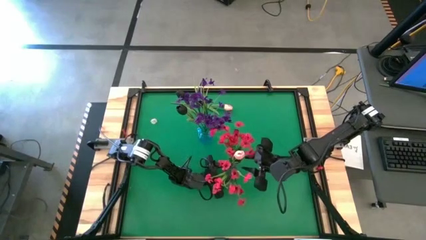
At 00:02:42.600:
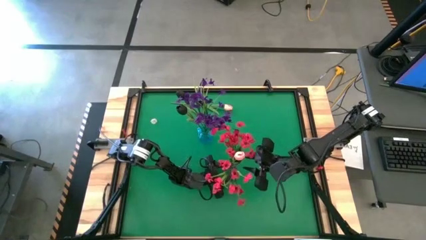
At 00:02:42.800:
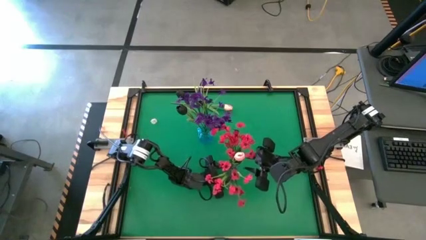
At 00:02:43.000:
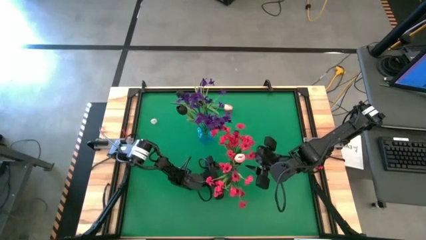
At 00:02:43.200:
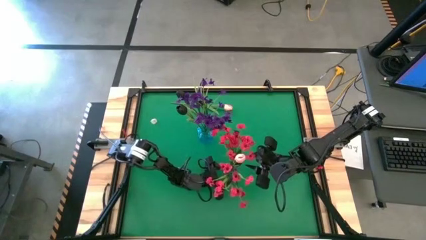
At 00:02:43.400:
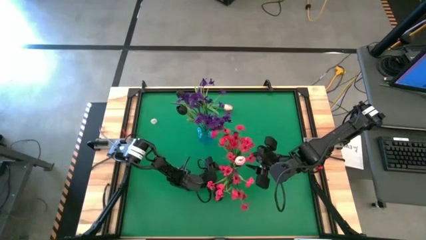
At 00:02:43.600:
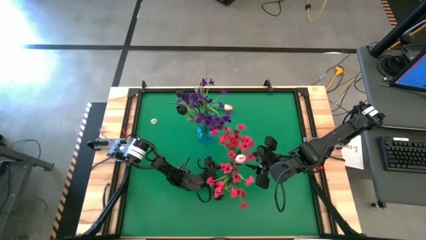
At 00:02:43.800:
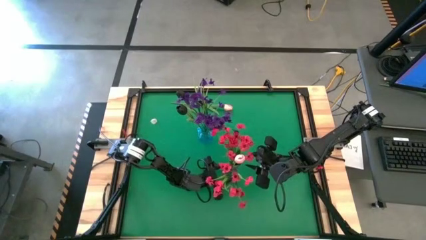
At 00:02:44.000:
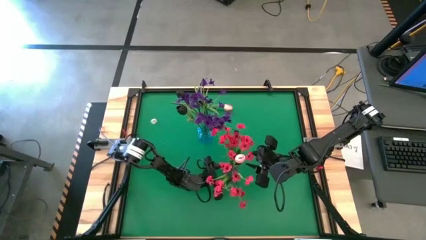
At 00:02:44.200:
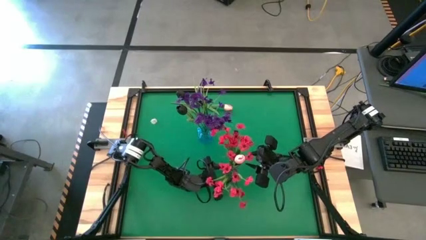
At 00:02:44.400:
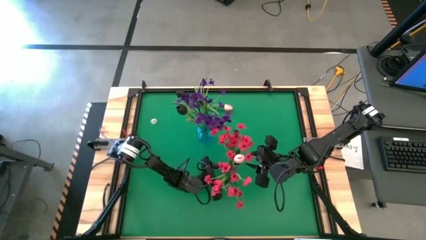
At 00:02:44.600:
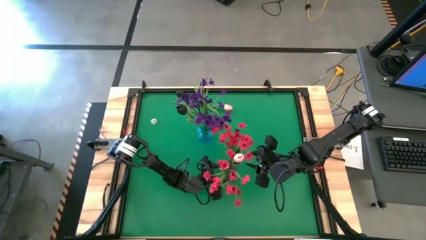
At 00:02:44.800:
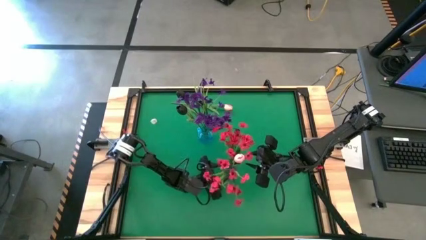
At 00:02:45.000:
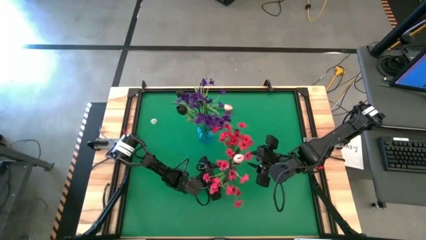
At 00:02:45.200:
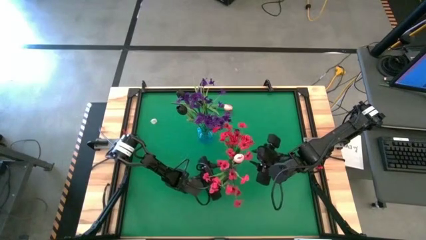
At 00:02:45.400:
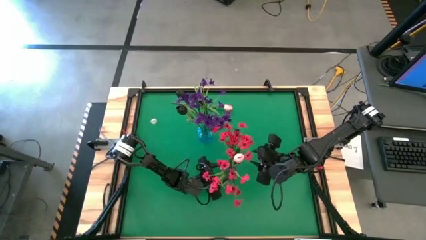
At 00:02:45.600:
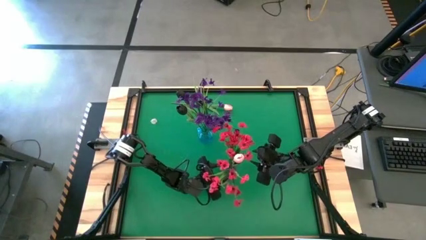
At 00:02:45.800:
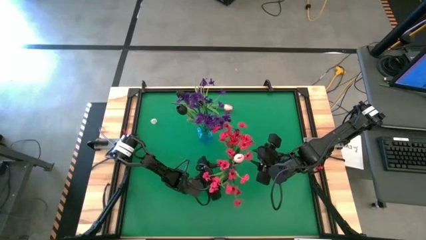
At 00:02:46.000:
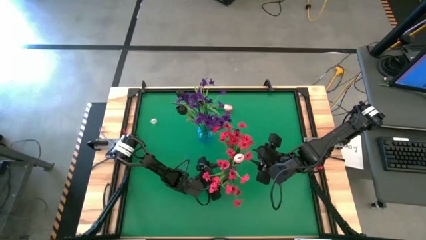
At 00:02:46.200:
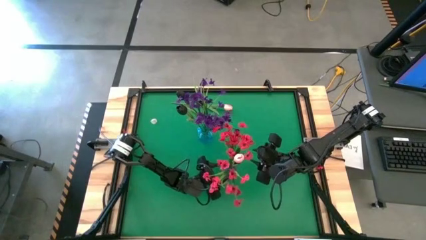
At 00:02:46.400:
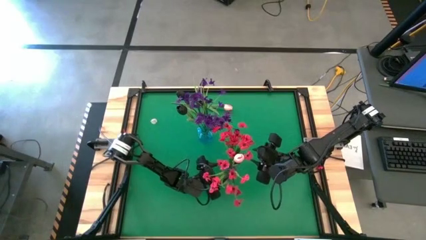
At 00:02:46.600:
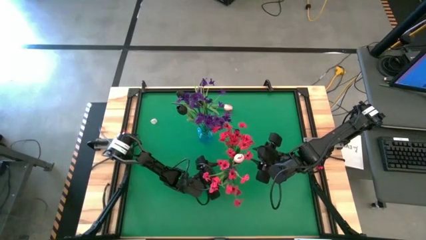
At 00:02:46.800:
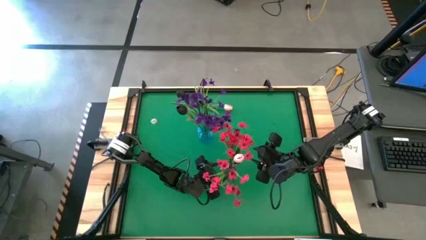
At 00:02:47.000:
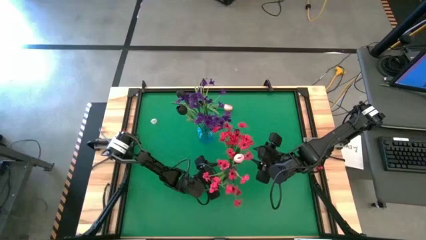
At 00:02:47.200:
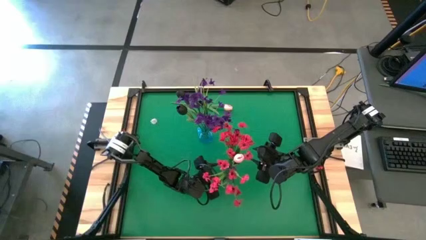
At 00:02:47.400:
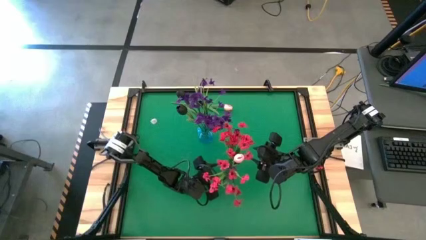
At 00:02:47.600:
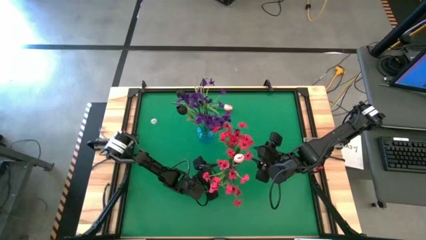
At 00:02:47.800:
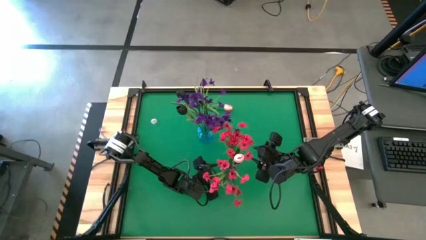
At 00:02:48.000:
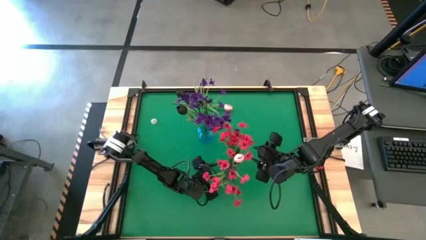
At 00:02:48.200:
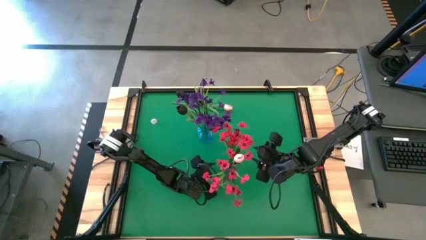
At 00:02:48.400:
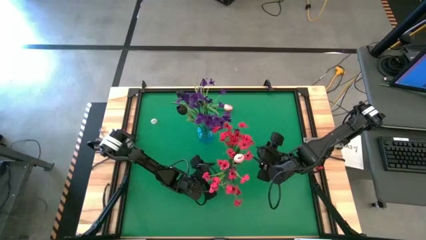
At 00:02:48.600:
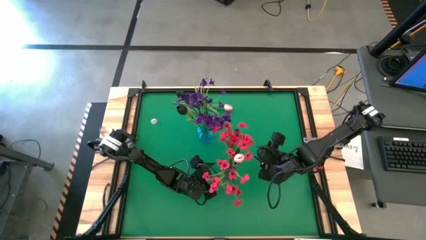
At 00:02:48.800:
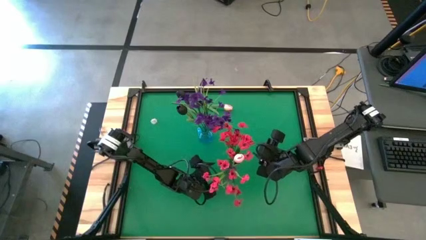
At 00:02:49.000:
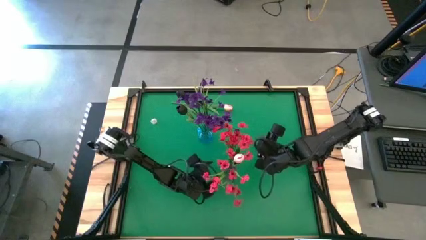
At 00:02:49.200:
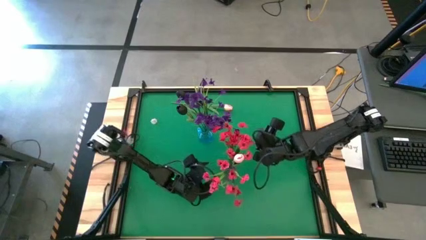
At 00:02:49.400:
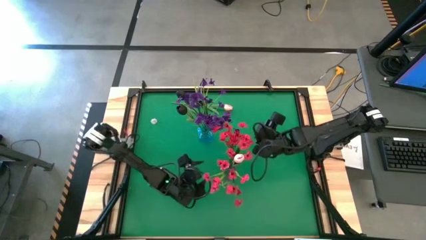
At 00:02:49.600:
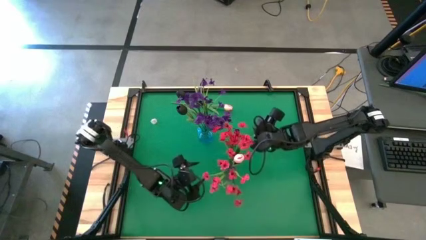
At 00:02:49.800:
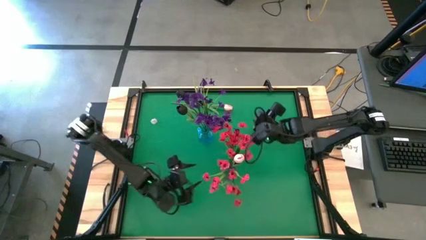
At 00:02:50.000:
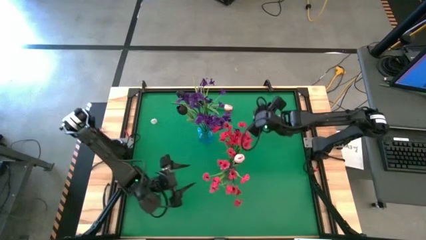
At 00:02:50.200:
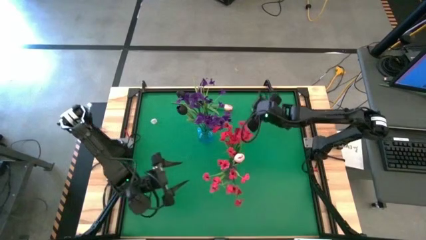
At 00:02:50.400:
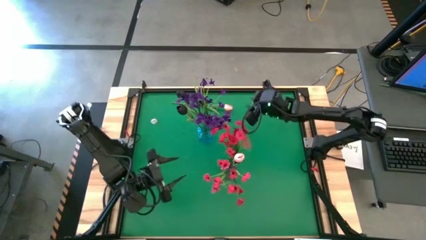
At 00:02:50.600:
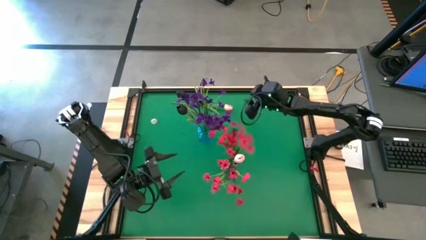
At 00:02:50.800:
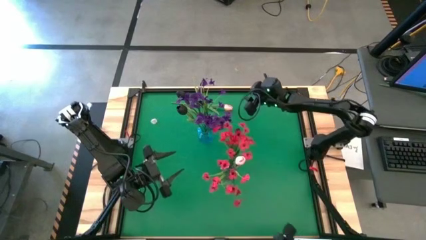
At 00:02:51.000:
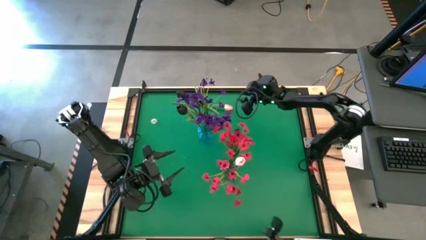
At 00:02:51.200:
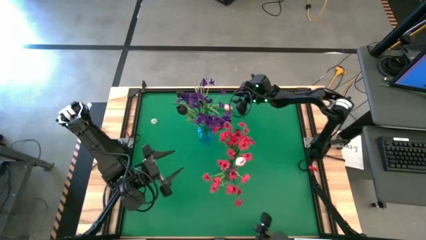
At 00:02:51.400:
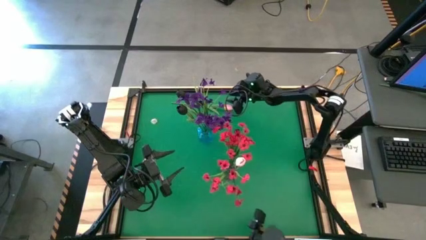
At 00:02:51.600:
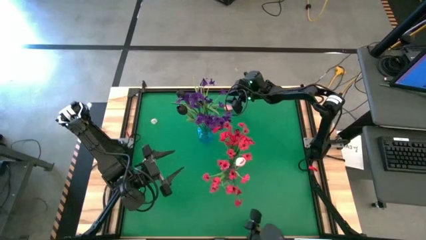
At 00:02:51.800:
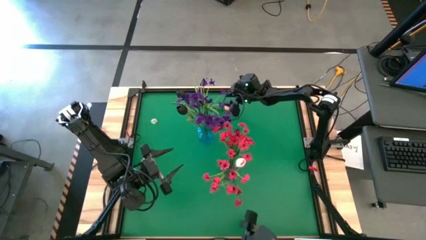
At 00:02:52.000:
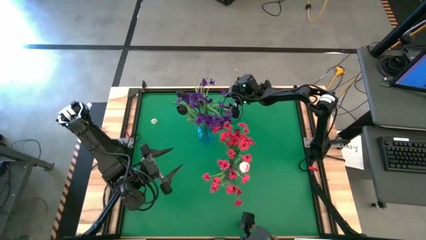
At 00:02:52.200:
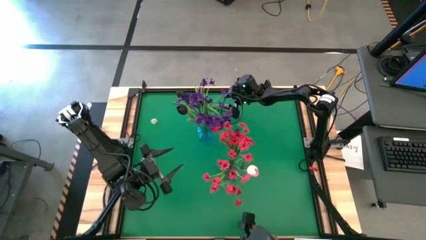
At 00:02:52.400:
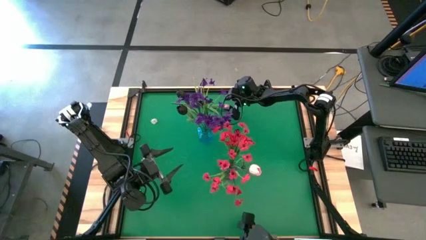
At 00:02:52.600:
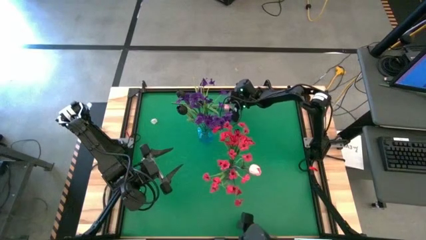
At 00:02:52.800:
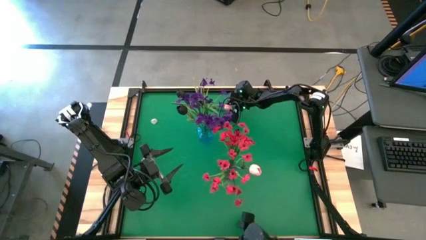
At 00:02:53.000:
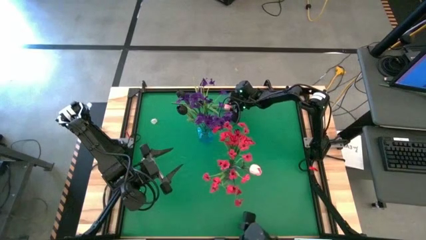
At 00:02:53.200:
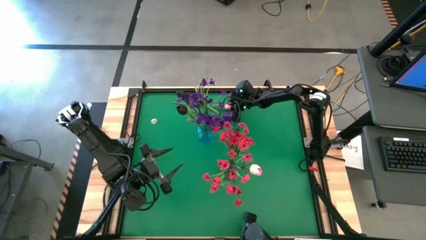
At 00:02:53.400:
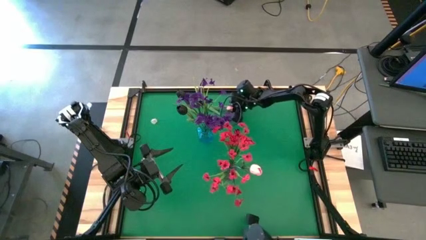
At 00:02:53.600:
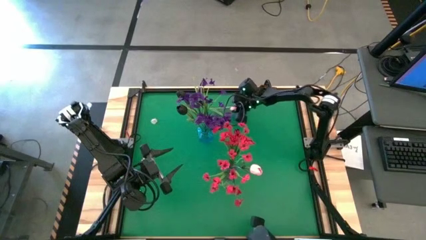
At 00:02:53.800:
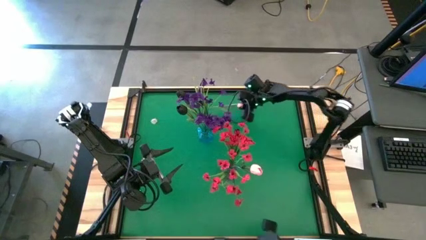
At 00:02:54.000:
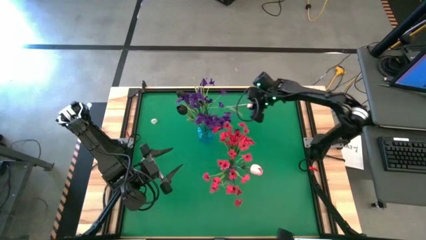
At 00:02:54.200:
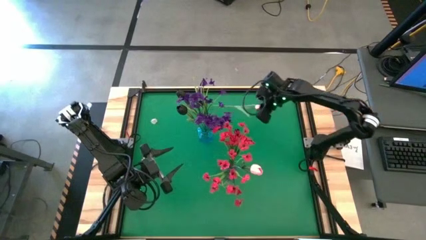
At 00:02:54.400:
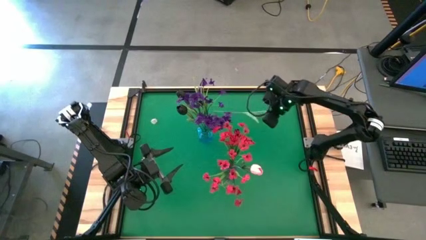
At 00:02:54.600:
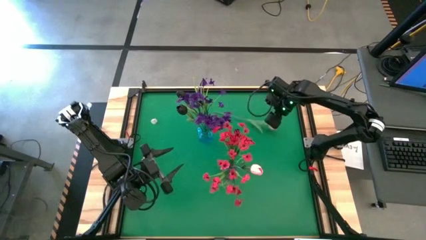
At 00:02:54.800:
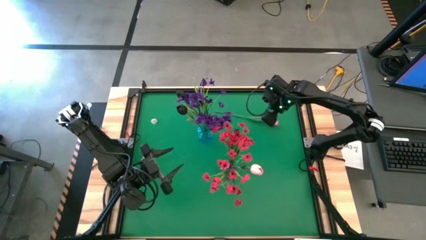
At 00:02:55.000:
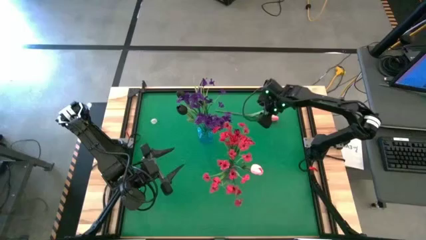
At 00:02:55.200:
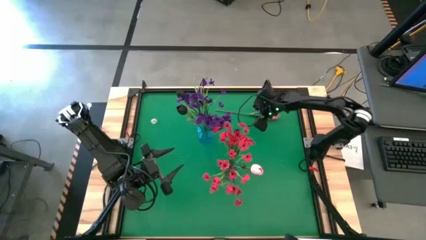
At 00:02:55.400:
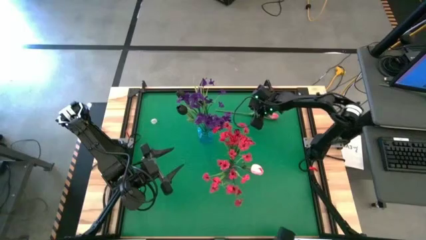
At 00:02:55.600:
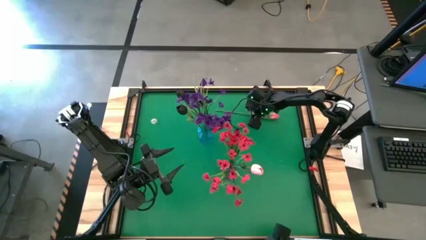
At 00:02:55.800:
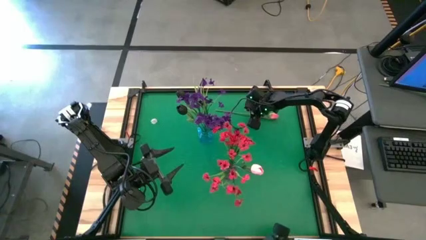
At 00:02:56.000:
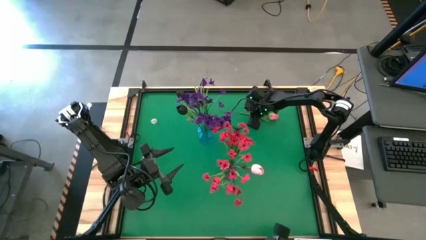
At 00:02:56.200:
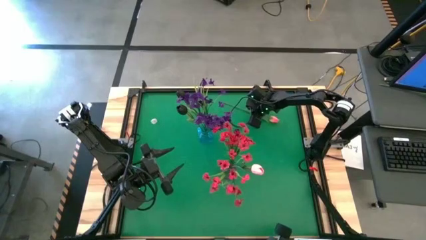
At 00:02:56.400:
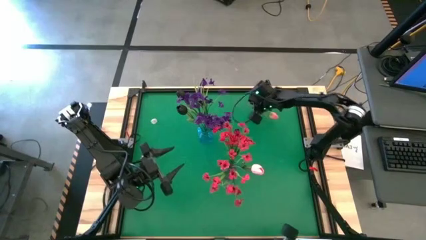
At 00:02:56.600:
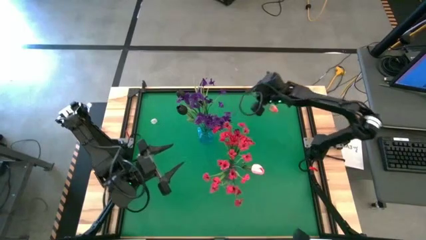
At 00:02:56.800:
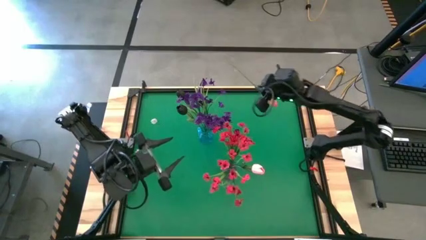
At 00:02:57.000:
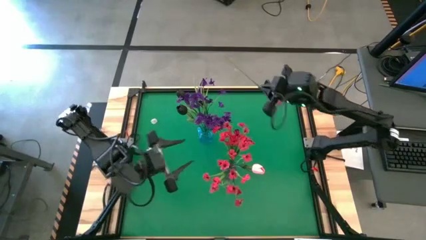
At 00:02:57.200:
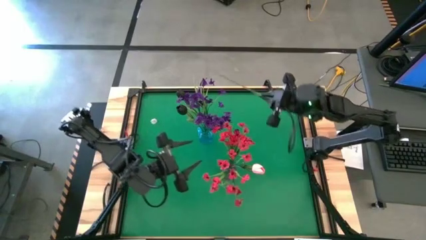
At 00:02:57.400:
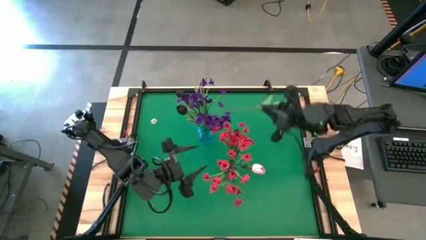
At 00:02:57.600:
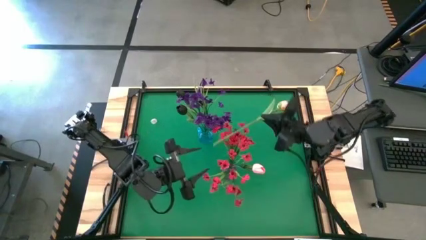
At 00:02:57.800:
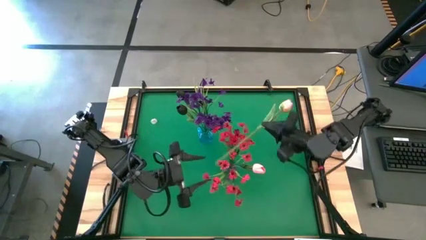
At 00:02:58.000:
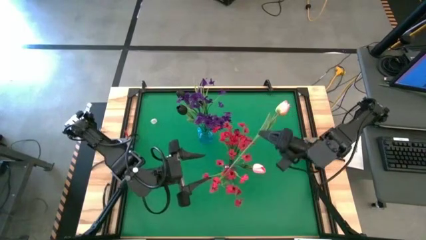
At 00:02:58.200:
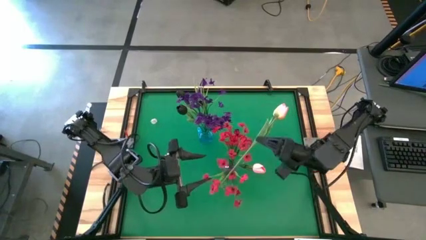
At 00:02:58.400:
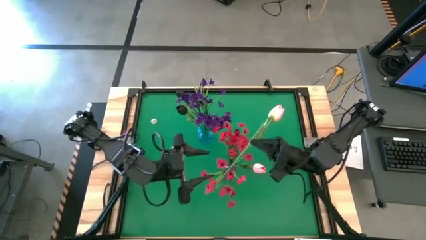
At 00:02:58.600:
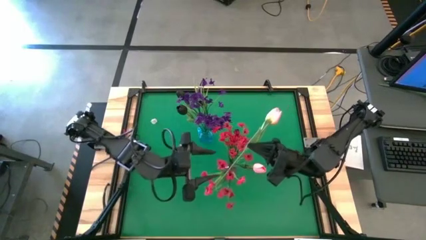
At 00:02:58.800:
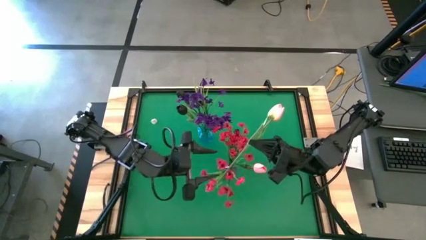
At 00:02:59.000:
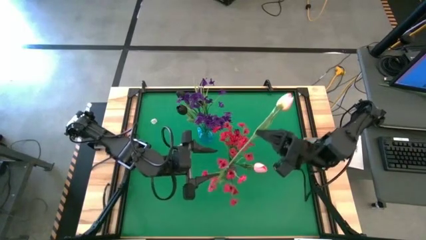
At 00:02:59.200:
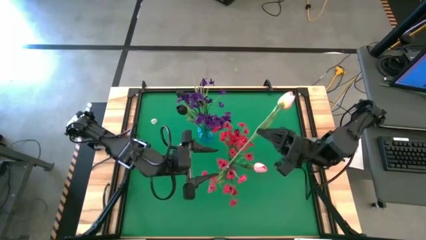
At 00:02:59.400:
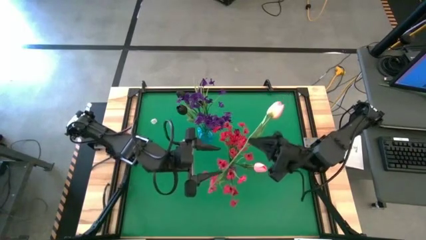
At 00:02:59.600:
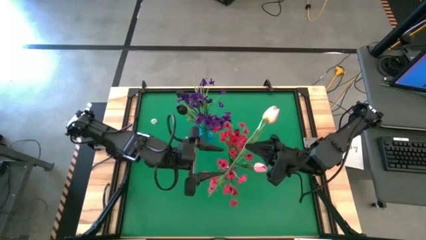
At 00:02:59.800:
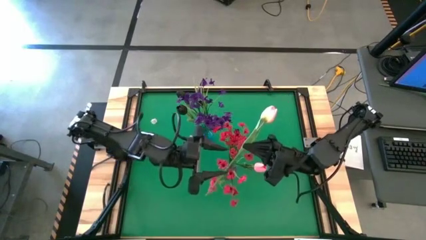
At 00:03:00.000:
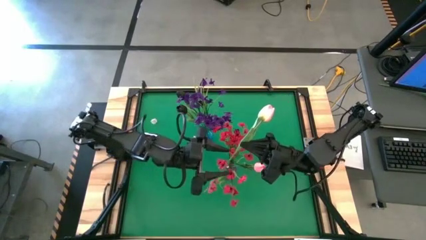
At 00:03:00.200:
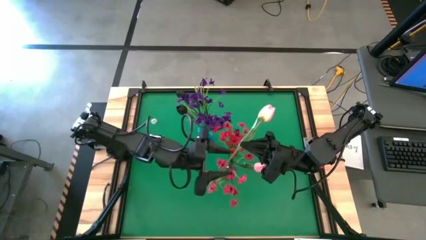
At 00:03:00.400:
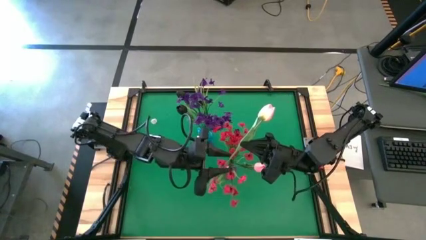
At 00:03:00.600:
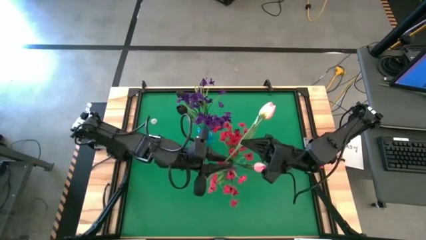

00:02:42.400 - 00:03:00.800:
Task: Sort flowers into vase by color
Put the pink tulip into the purple vase
